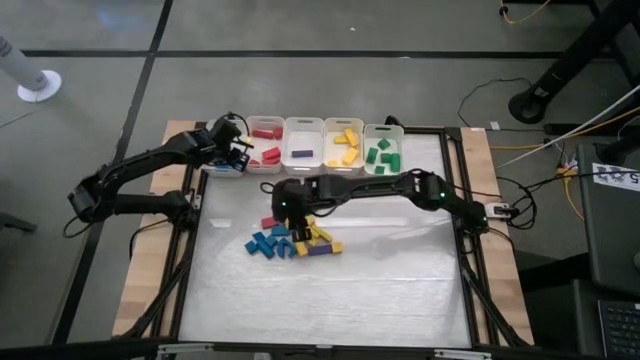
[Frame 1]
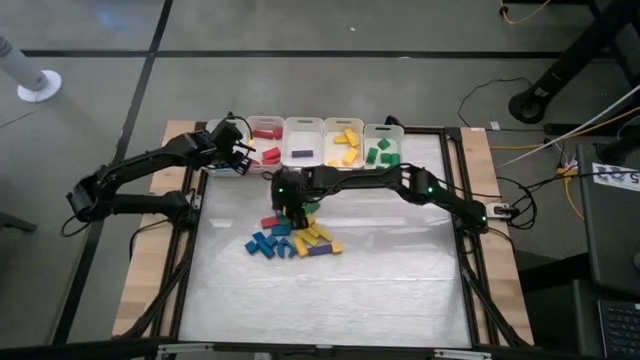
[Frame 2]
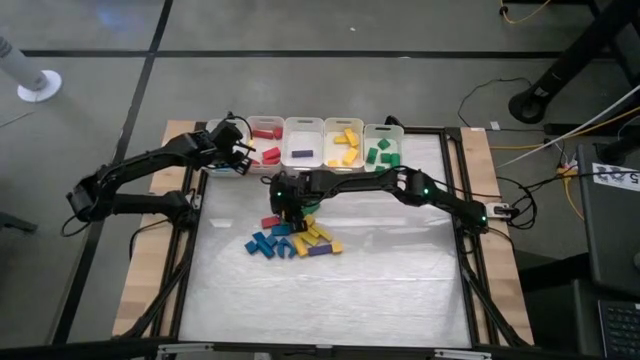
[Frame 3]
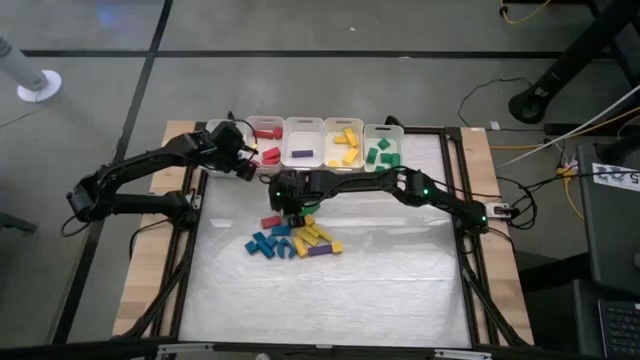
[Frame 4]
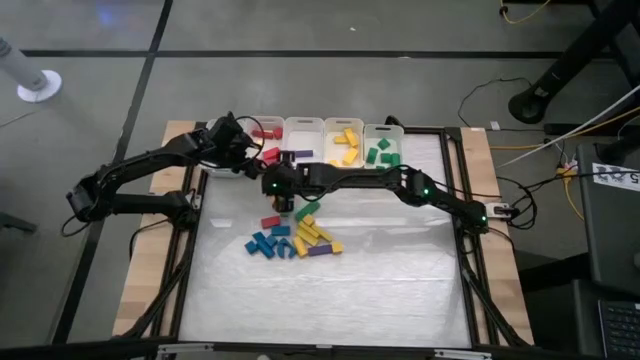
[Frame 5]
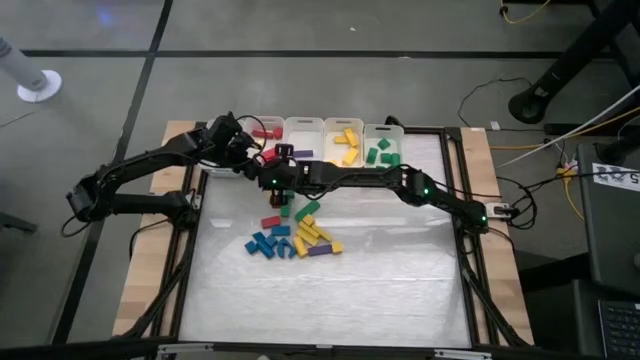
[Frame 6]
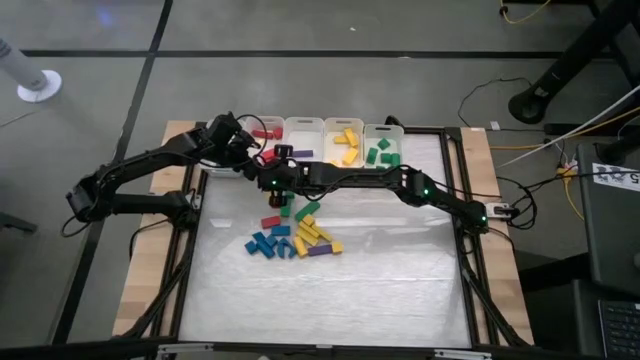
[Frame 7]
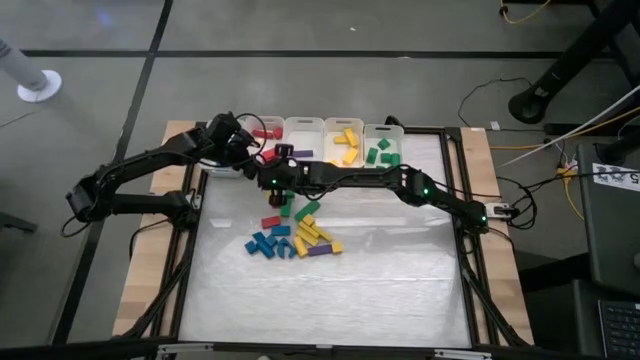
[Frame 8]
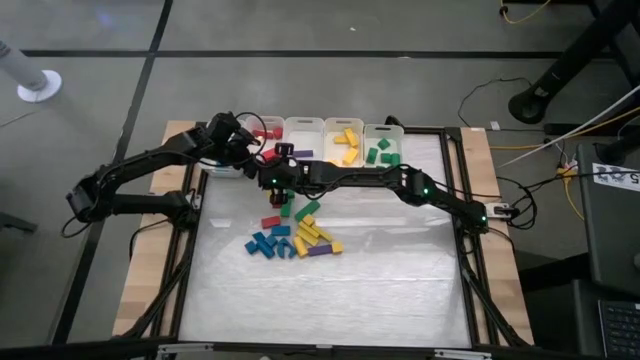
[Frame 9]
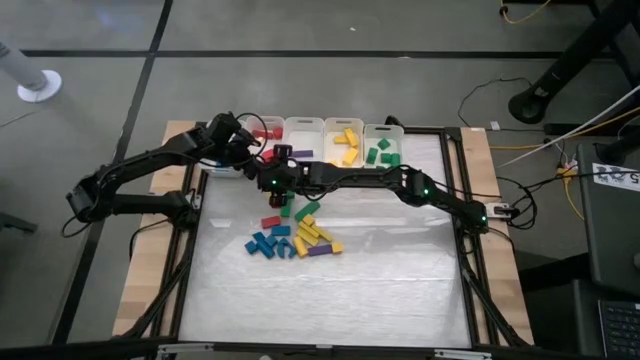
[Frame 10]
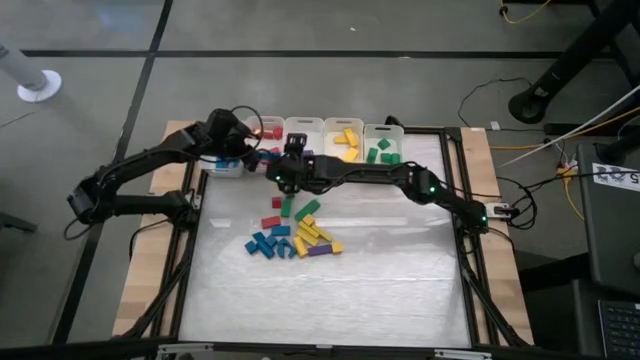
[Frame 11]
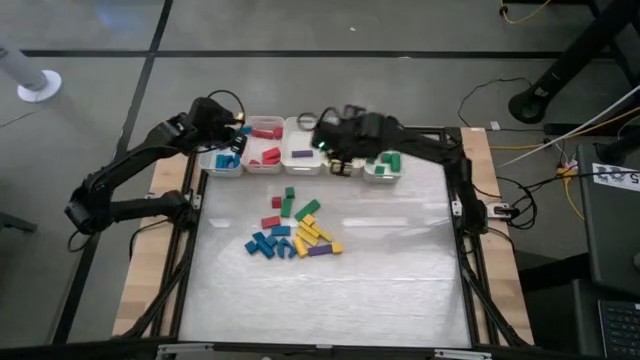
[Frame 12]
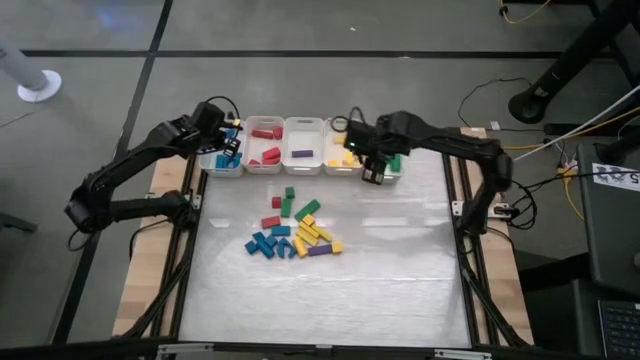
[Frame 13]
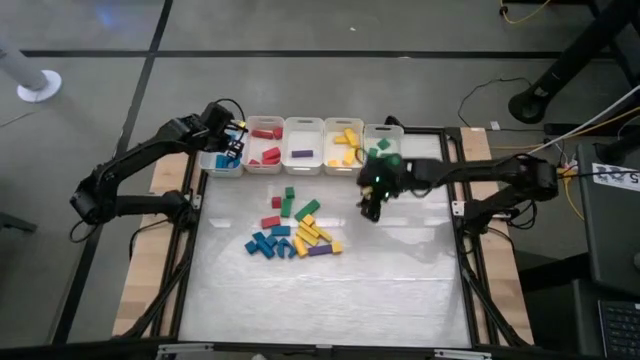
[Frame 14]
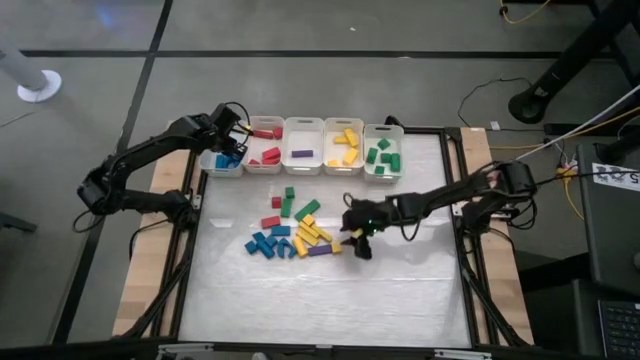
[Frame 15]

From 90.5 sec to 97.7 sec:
Task: Sort blocks
Put the blue block into the left white bin

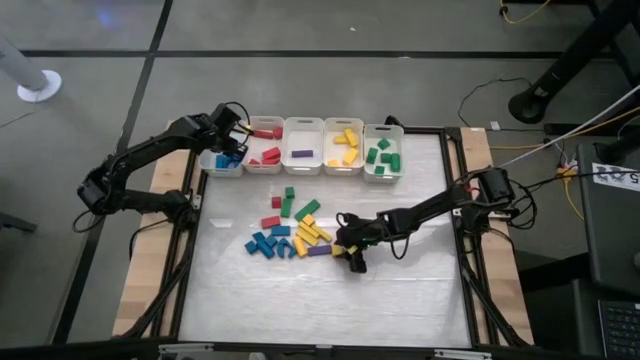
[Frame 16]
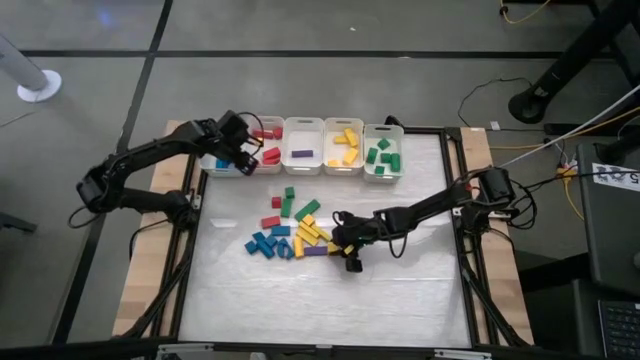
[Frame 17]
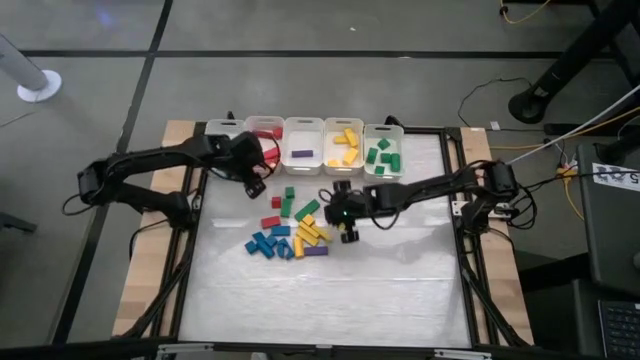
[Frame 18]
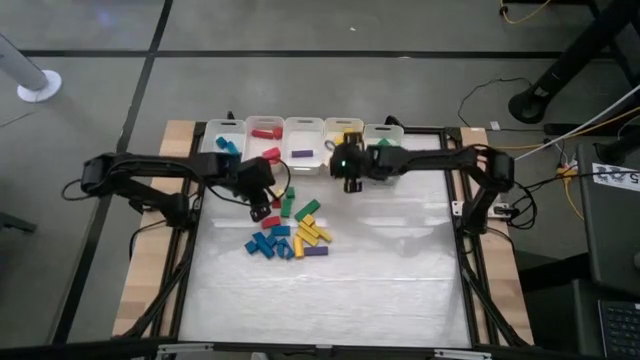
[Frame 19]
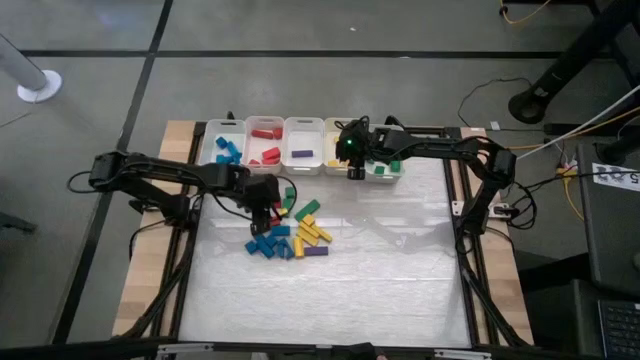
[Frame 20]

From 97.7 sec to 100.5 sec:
Put the yellow block into the middle right white bin

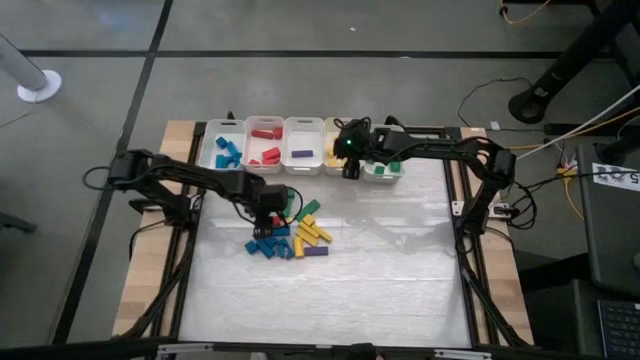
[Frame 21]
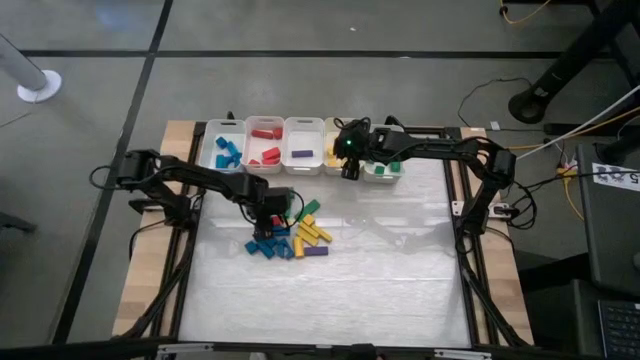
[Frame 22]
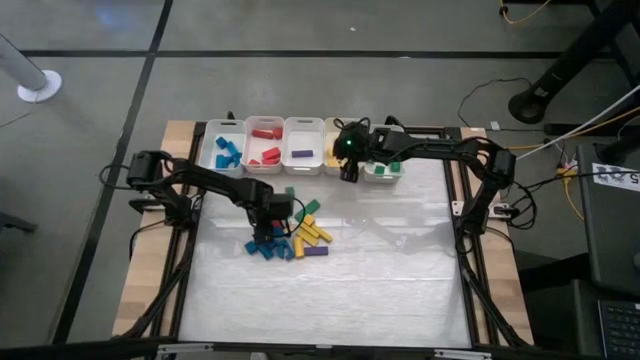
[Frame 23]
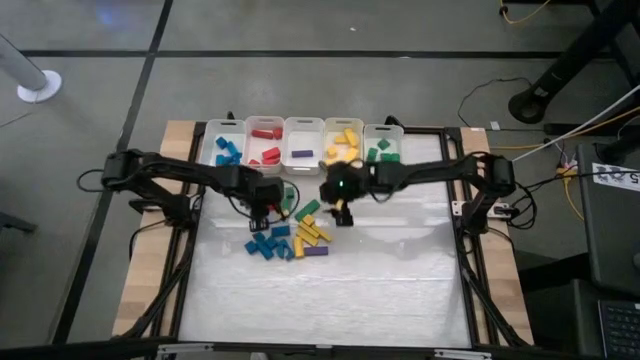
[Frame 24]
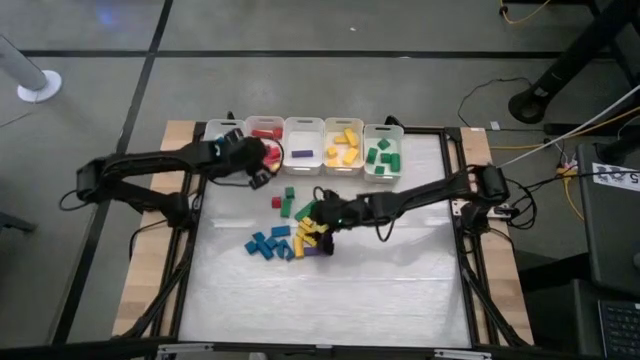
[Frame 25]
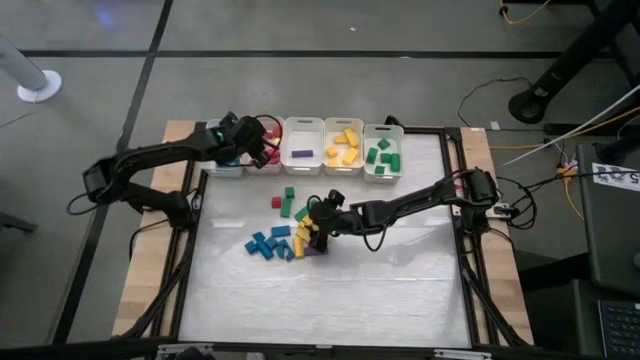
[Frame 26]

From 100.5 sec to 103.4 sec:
Put the red block into the middle left white bin

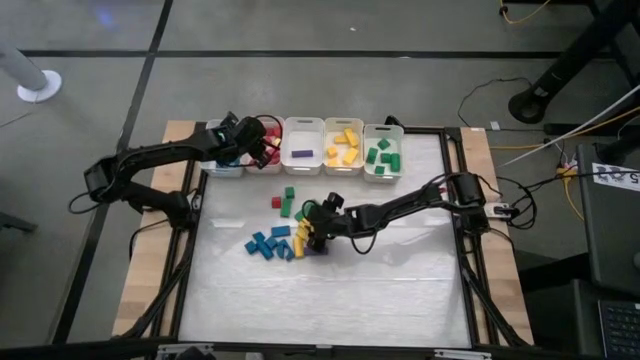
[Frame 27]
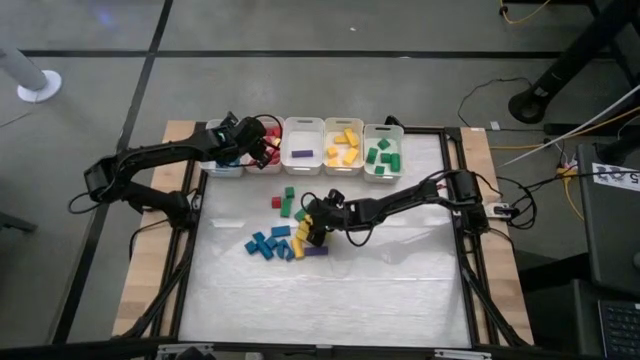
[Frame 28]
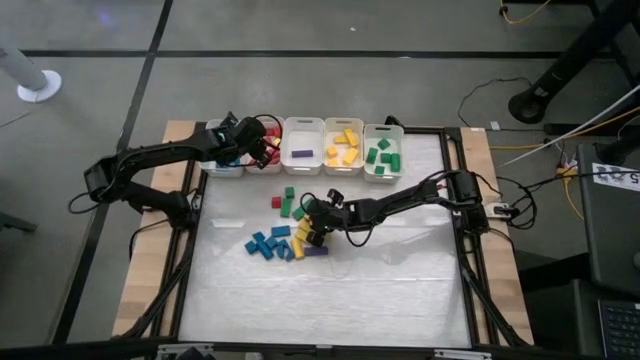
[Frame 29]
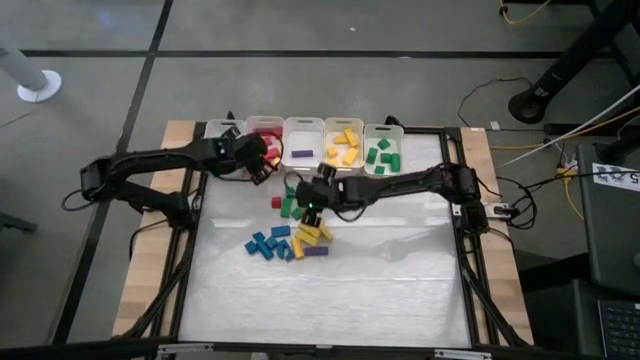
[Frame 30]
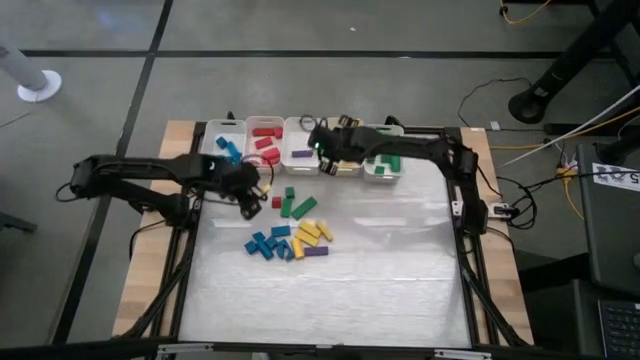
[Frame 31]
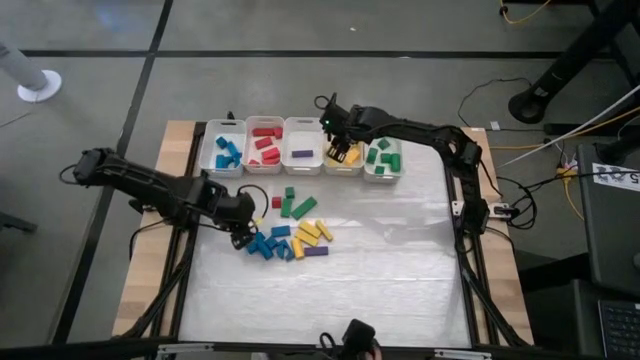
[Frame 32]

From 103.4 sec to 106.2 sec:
Put the yellow block into the middle right white bin

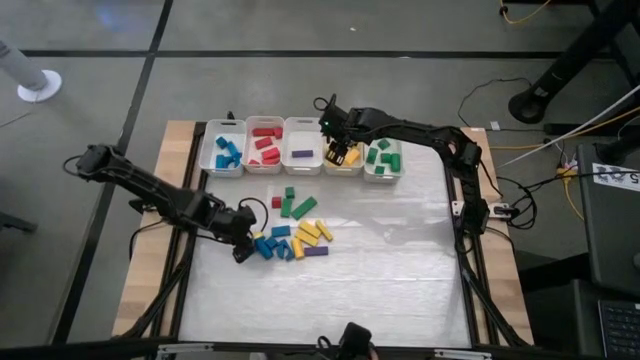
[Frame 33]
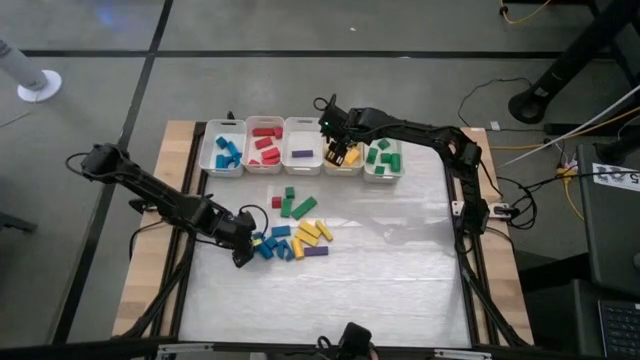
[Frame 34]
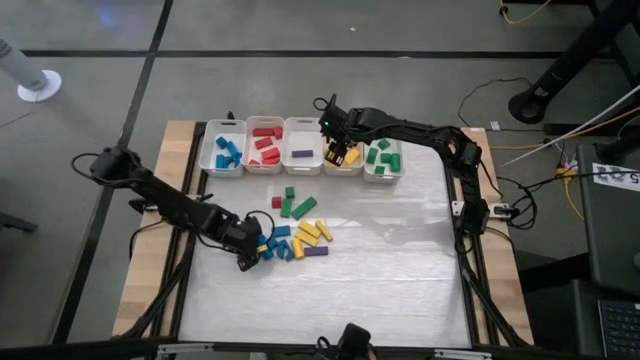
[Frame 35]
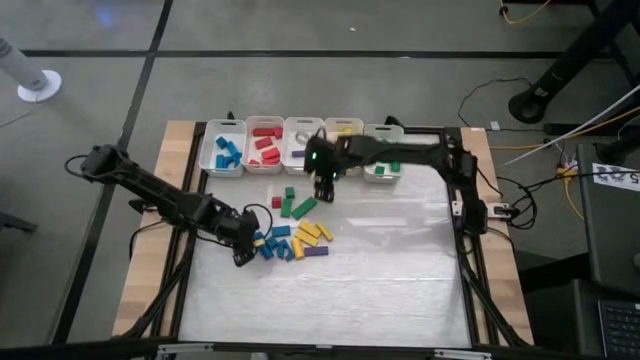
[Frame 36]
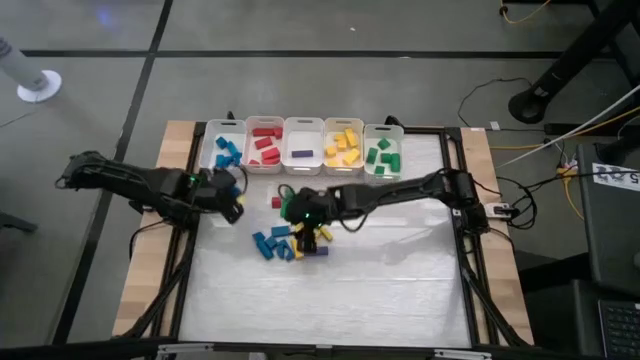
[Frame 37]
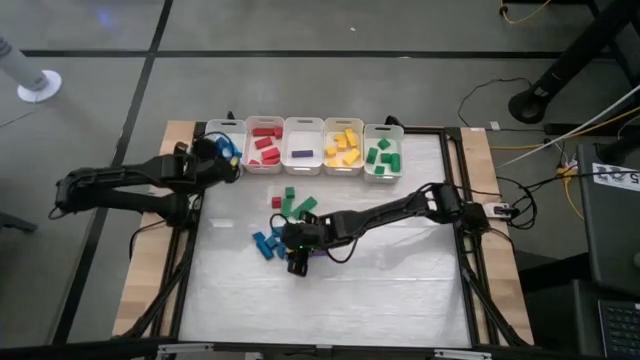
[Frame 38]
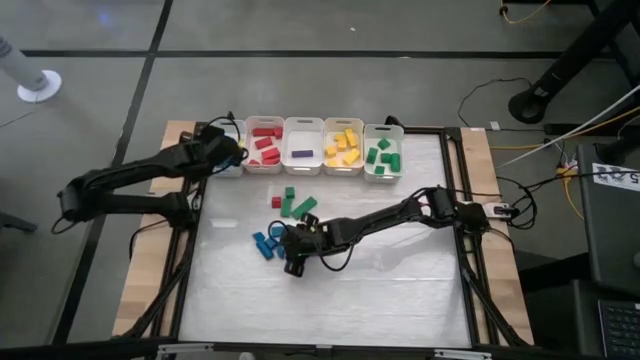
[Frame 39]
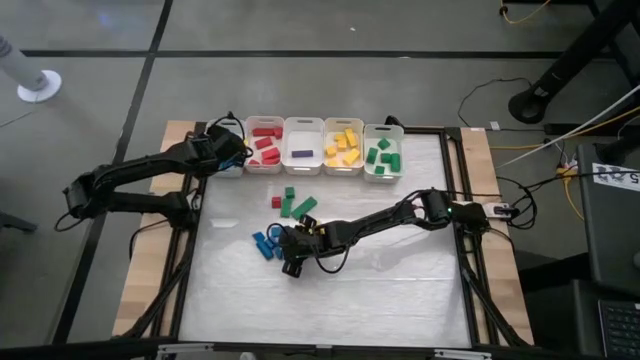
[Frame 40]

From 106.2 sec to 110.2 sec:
Put the blue block into the left white bin
